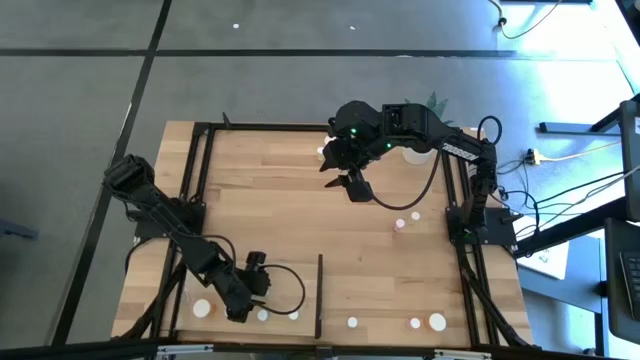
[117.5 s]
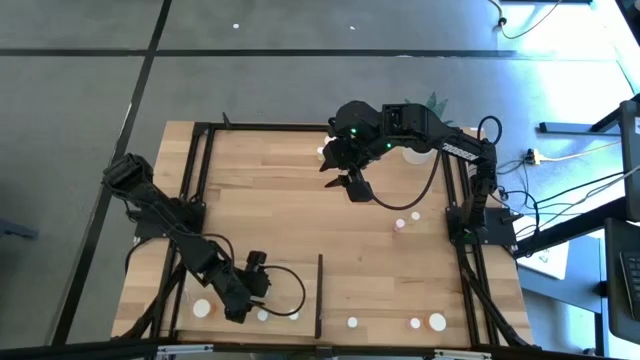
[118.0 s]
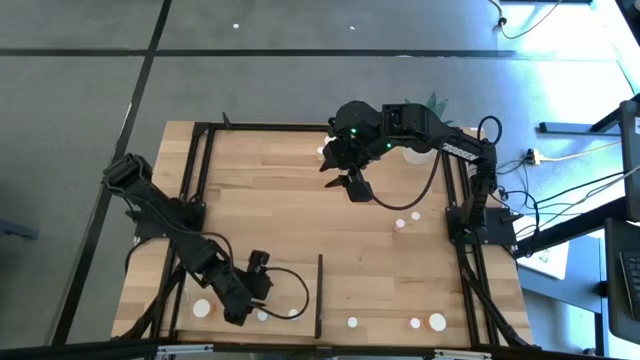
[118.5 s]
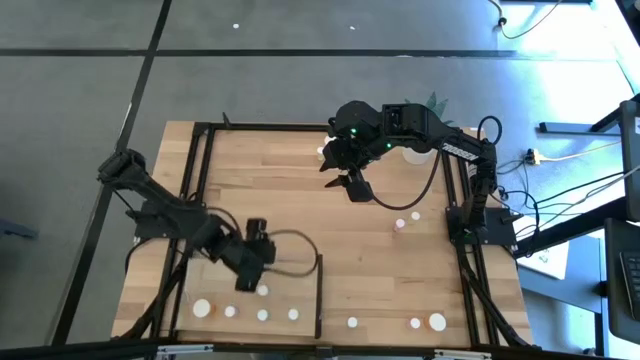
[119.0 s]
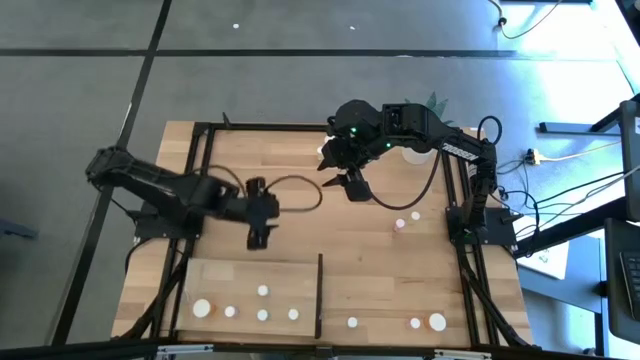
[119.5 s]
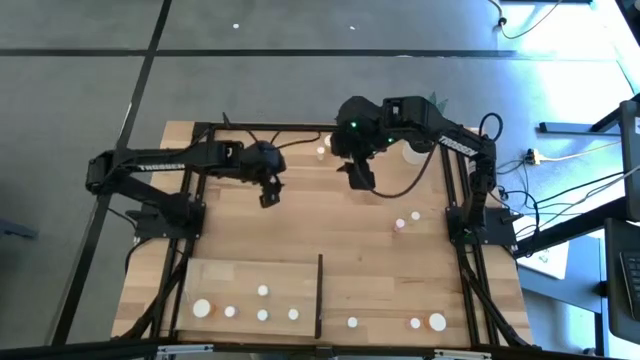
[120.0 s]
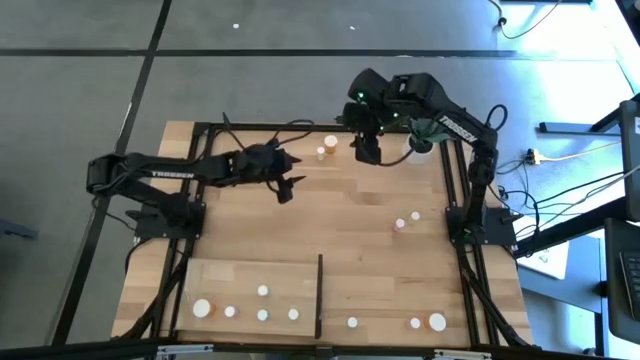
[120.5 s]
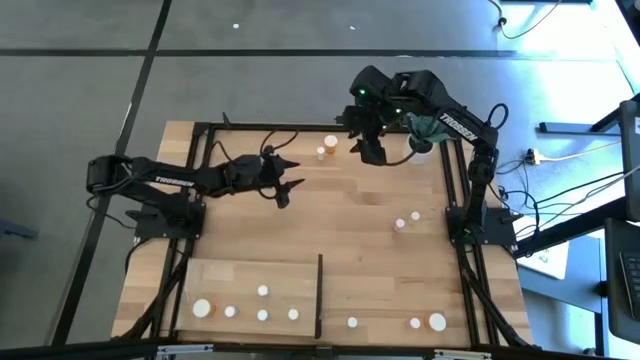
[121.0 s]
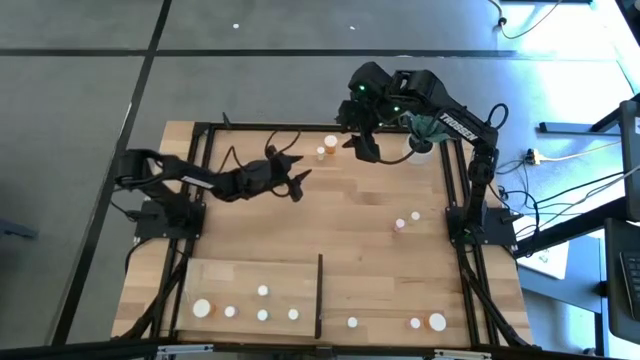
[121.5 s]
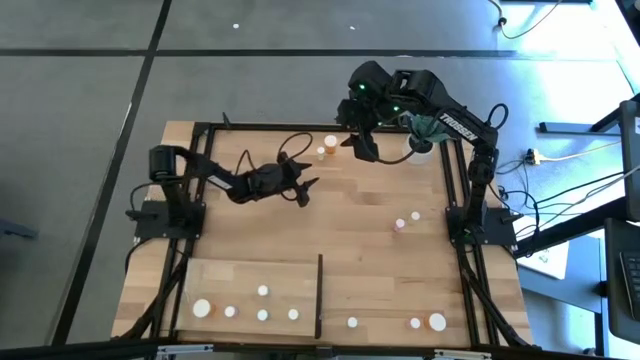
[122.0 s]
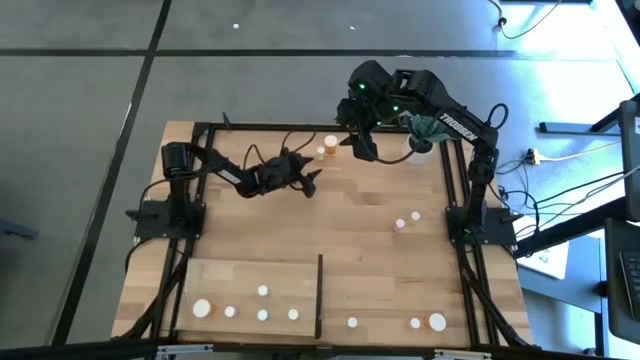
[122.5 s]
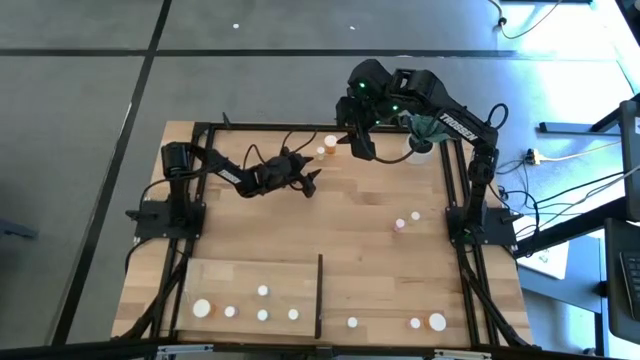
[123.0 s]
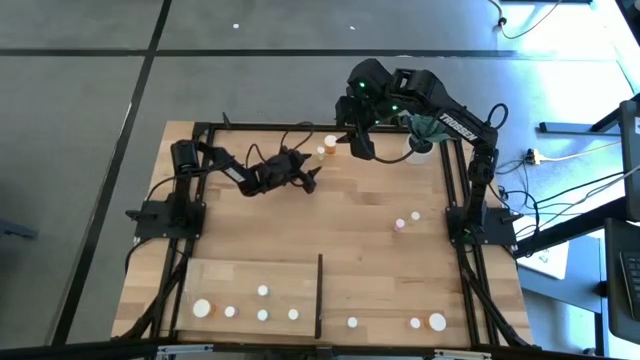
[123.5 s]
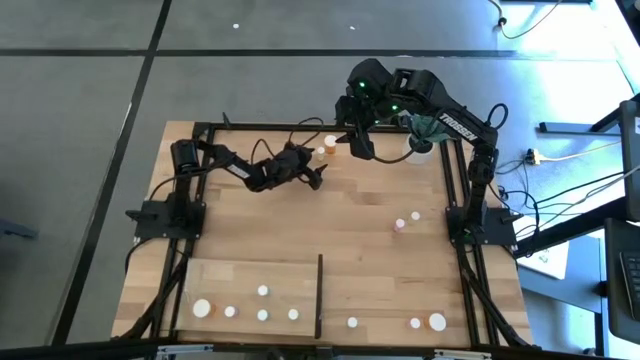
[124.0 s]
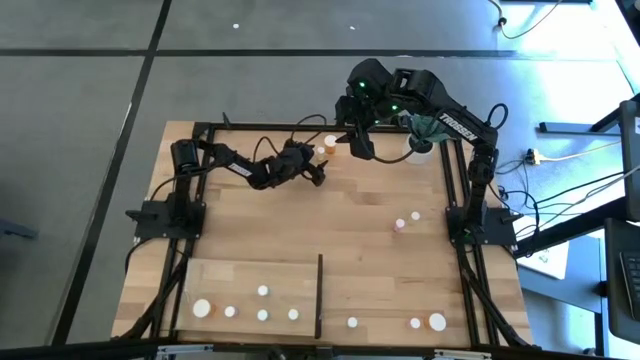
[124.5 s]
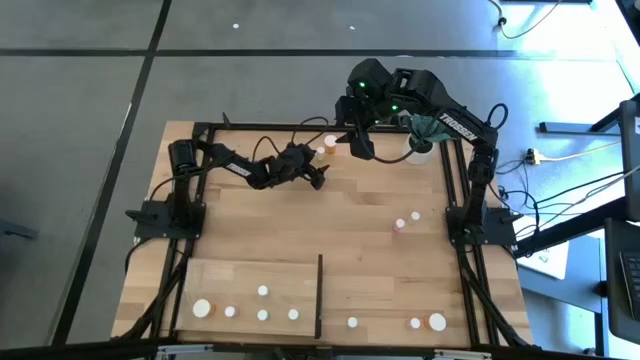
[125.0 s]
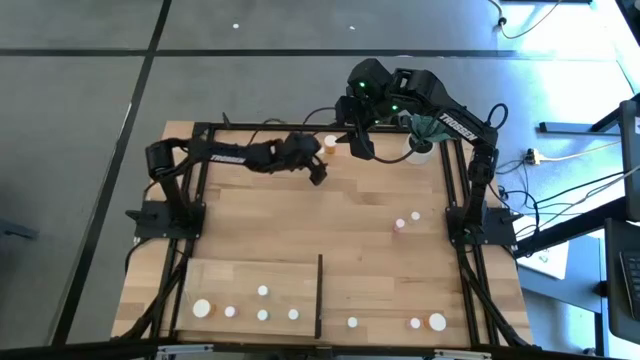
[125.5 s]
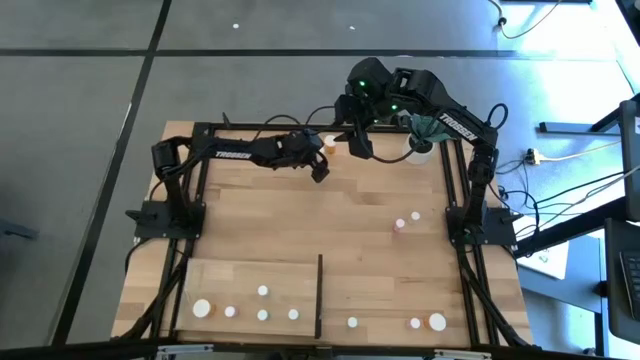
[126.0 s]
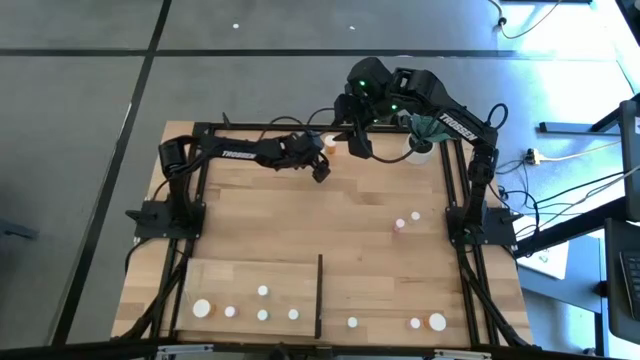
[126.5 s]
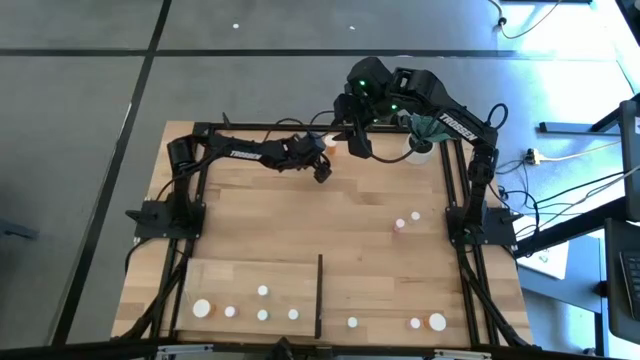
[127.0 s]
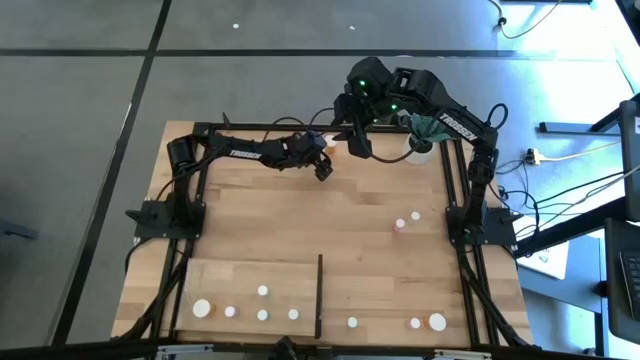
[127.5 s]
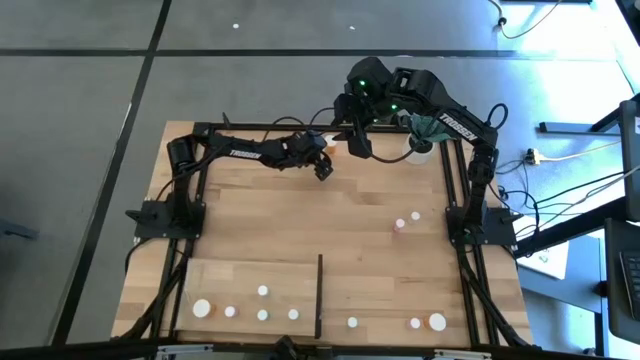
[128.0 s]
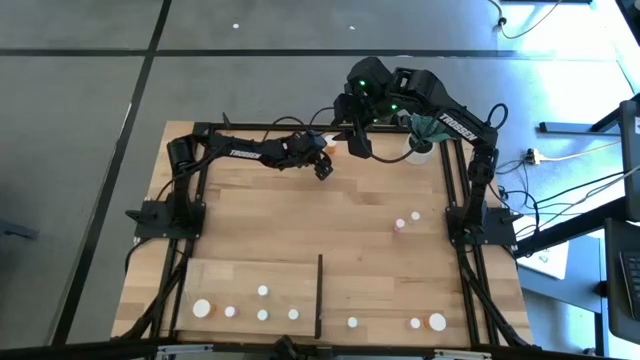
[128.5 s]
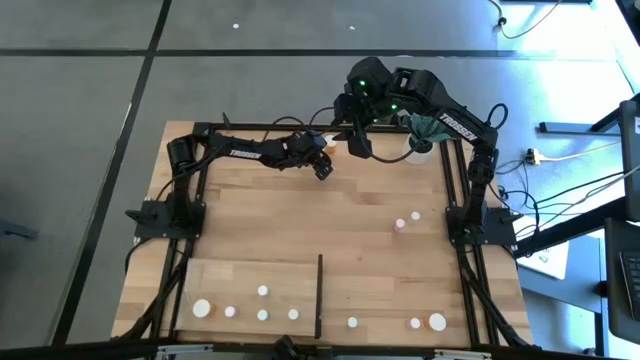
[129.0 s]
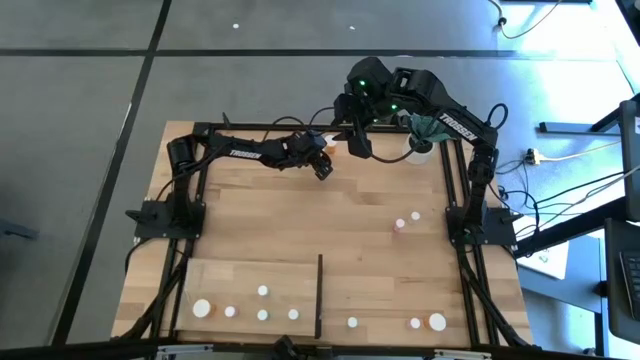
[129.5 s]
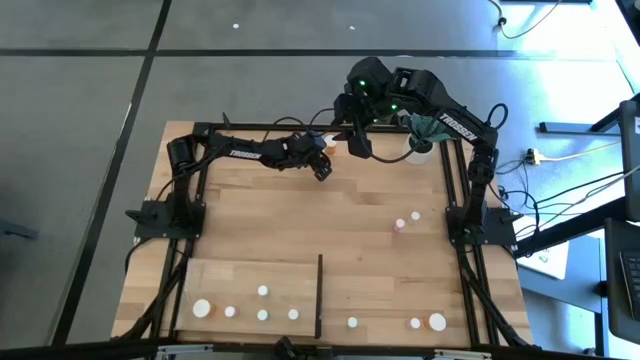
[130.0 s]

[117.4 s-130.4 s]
Task: Pick and place medicine bottles onto shelf by color
Put the top yellow pill bottle on the shelf aligned with the other yellow pill bottle

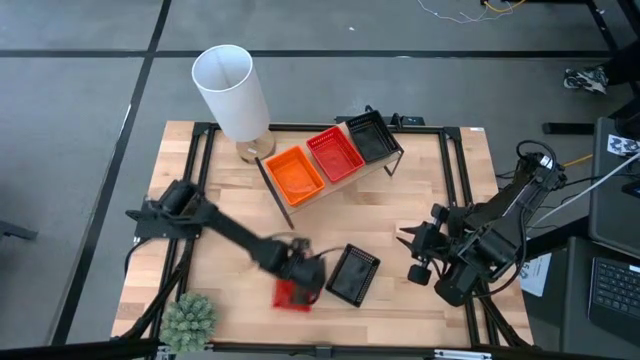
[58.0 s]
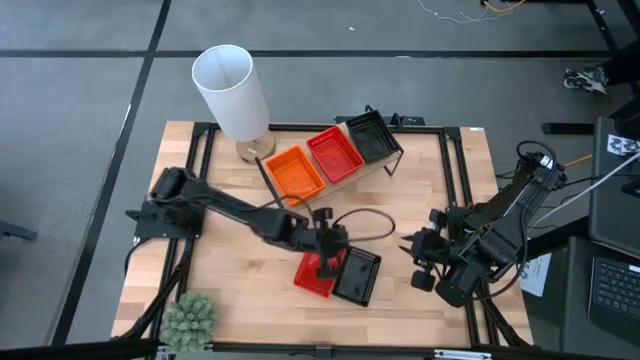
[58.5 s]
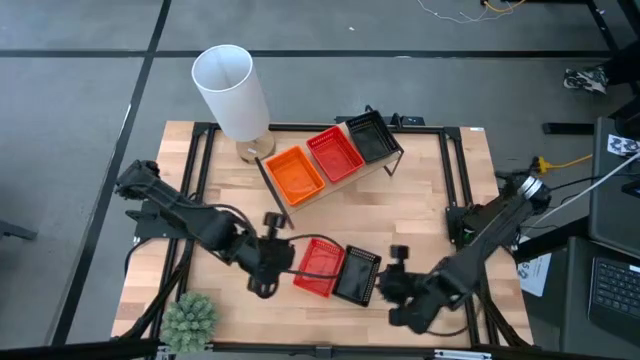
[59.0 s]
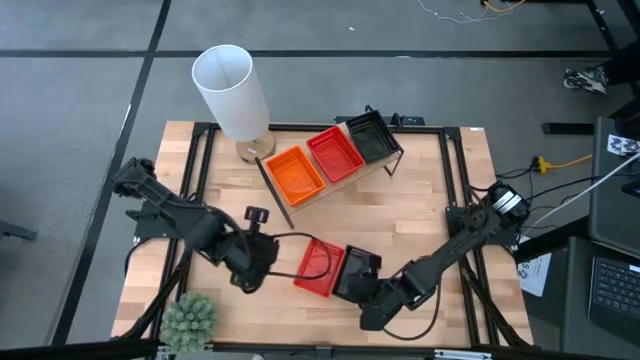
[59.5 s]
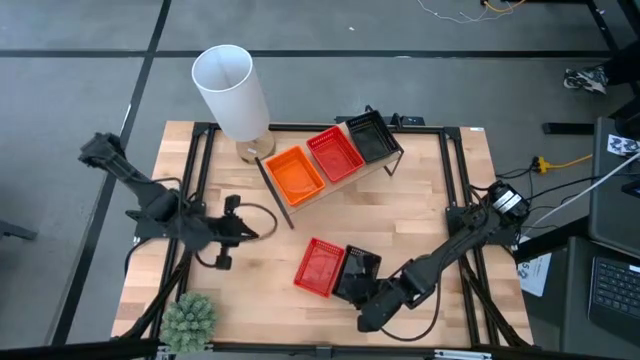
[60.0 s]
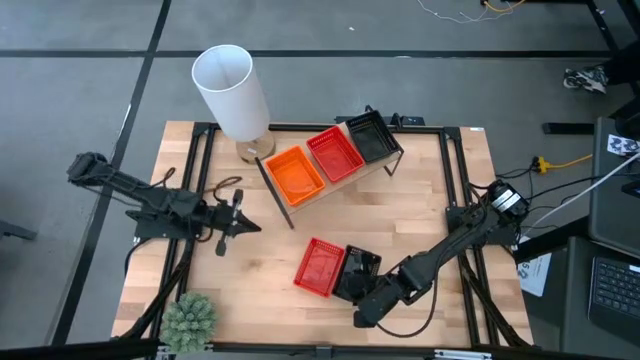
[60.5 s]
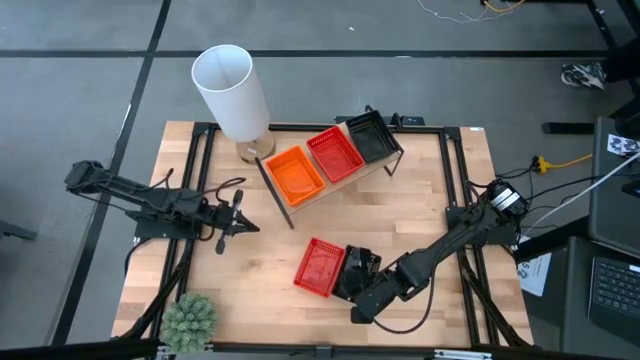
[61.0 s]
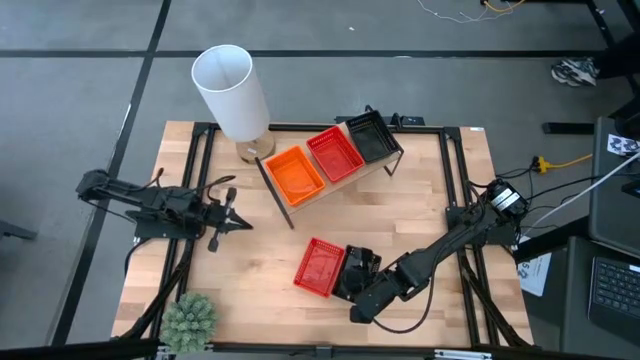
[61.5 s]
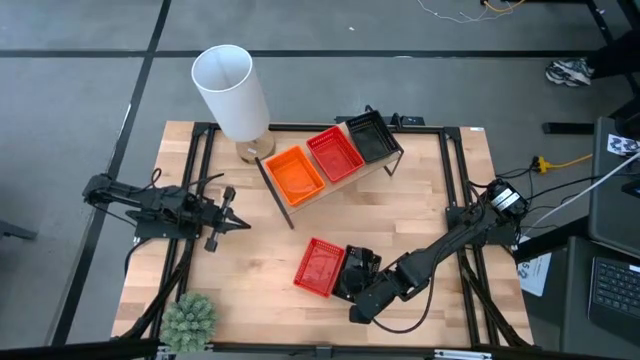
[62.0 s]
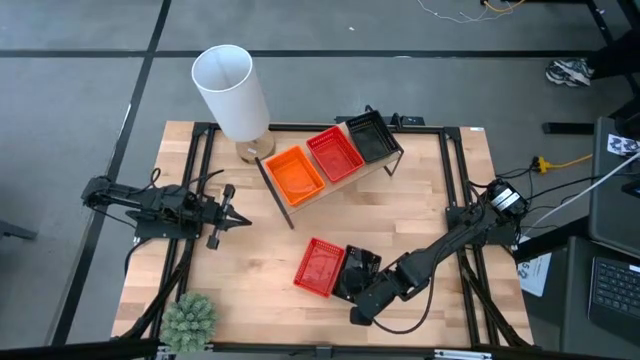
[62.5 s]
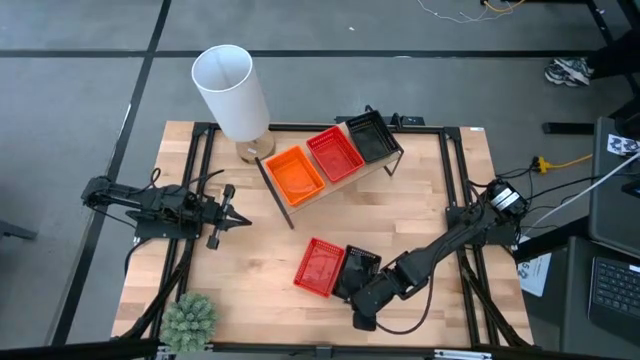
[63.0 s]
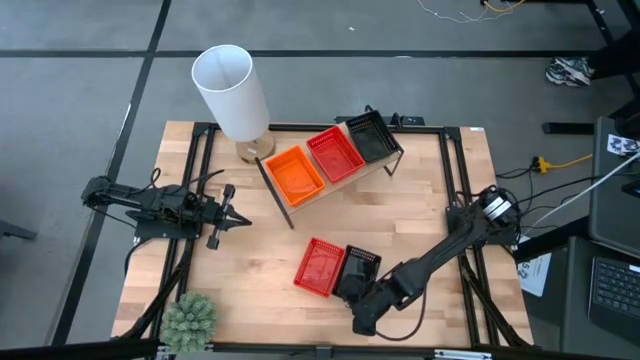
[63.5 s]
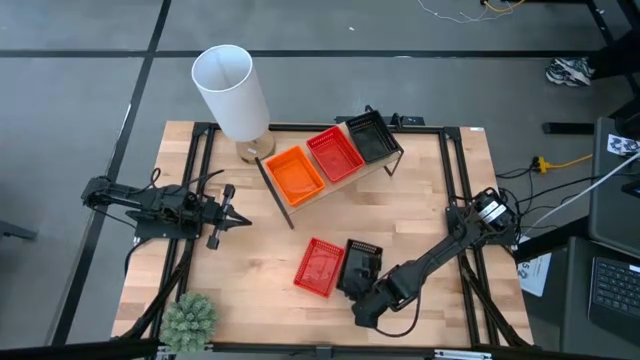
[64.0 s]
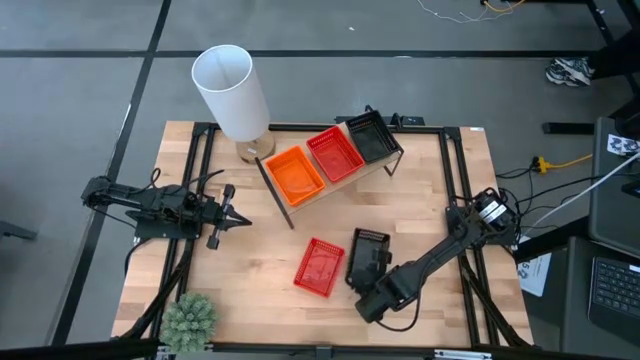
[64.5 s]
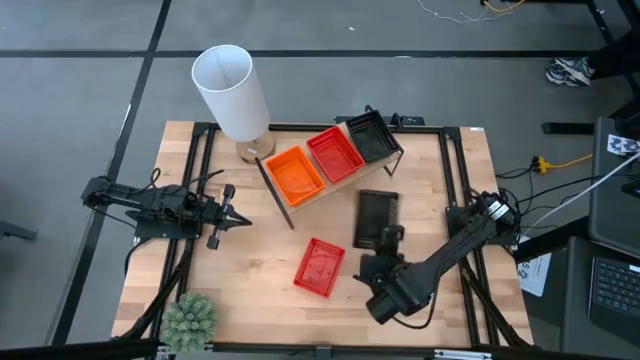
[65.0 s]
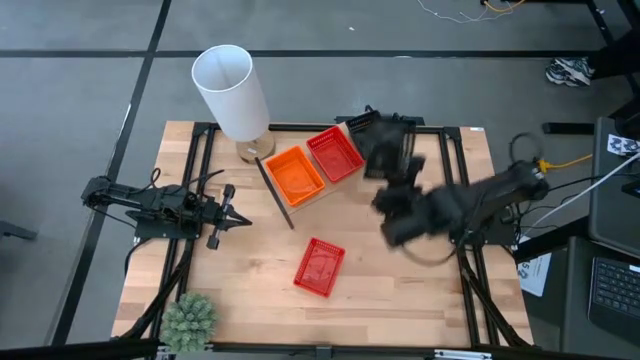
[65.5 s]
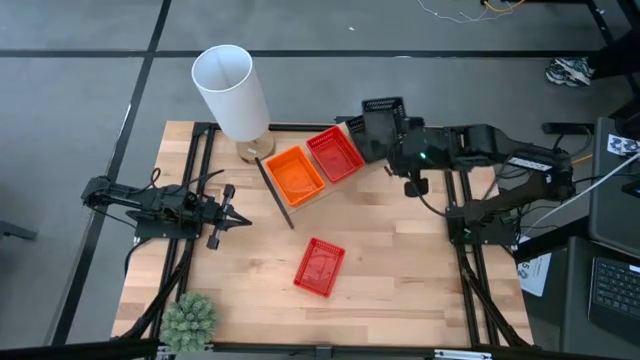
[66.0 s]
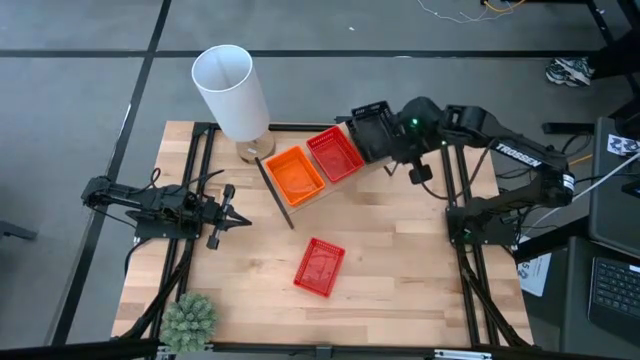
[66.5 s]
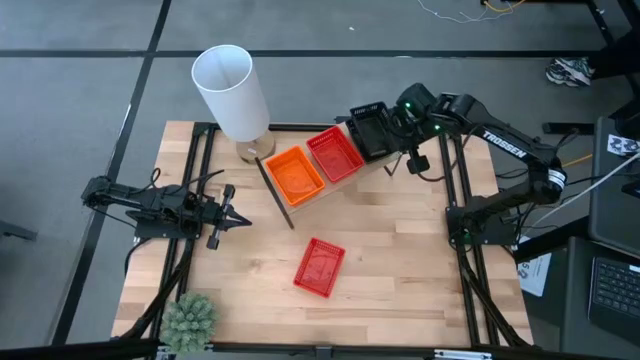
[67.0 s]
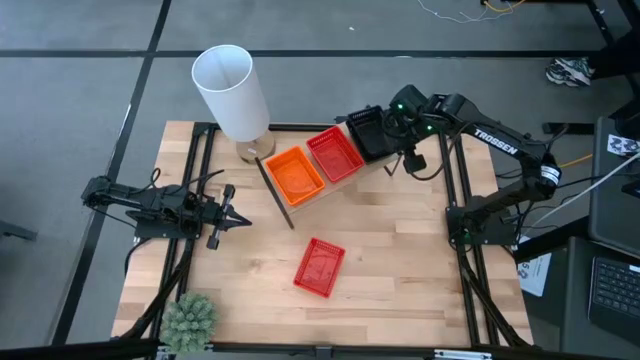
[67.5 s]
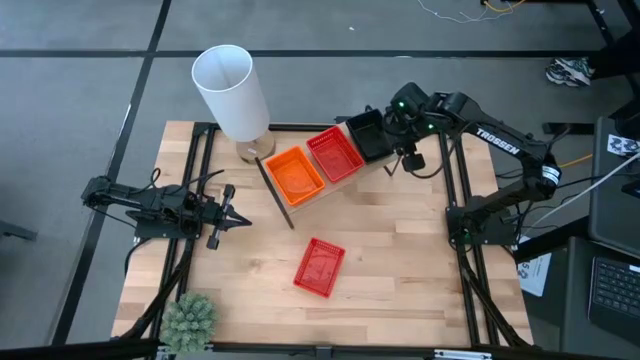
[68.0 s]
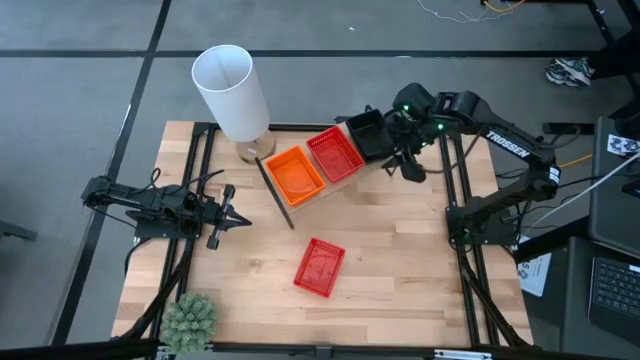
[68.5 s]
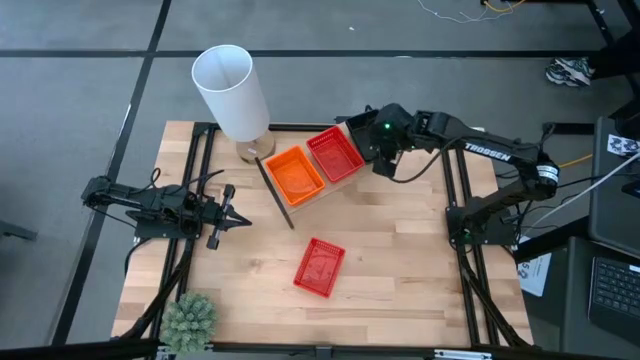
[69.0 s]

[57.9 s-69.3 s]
Task: Stack baskets on shelf by color
Stack the black basket on top of the other stacked black baskets on the shelf
